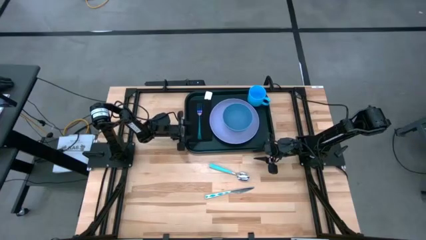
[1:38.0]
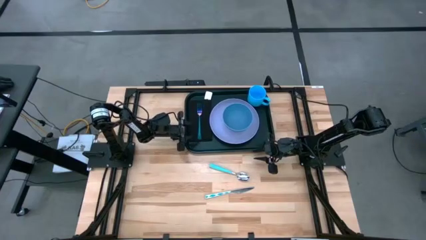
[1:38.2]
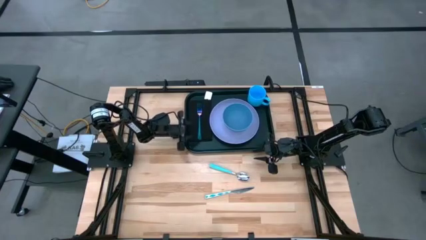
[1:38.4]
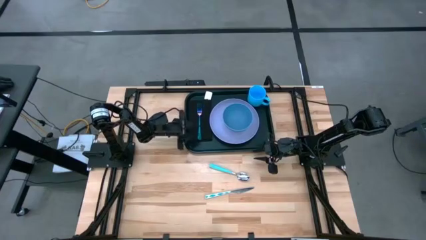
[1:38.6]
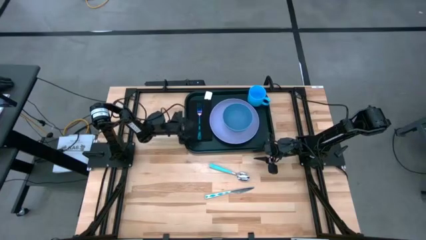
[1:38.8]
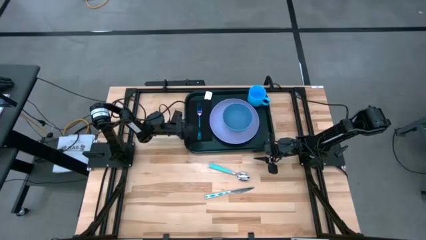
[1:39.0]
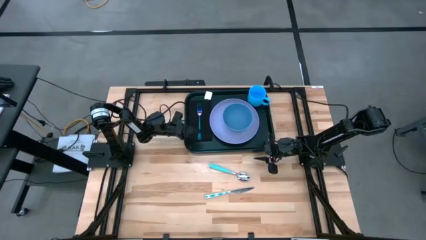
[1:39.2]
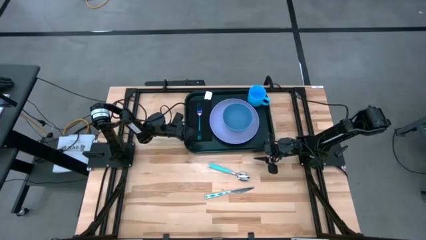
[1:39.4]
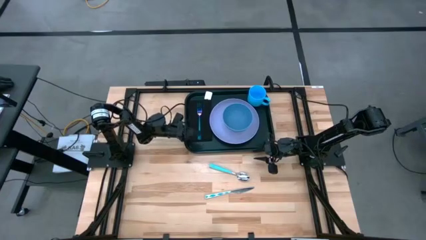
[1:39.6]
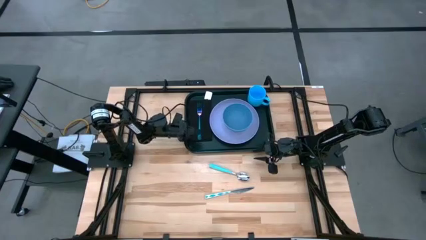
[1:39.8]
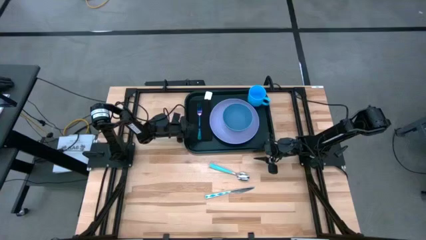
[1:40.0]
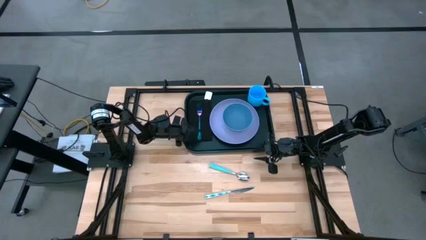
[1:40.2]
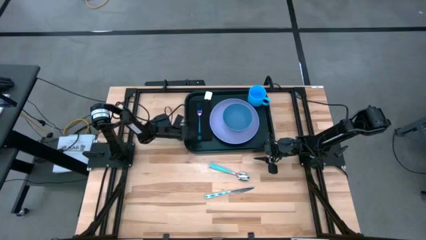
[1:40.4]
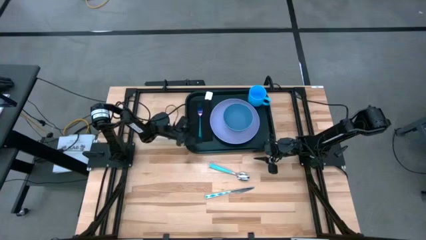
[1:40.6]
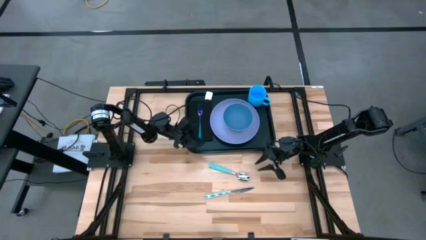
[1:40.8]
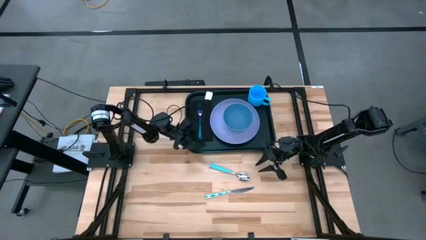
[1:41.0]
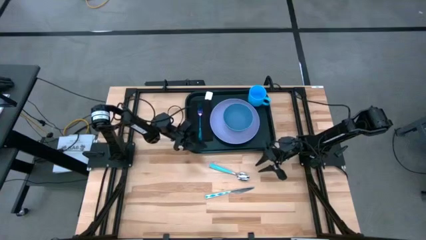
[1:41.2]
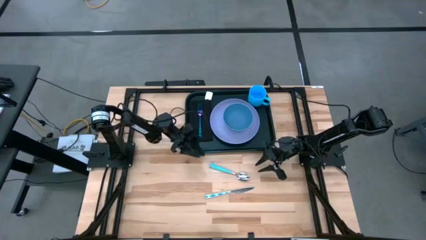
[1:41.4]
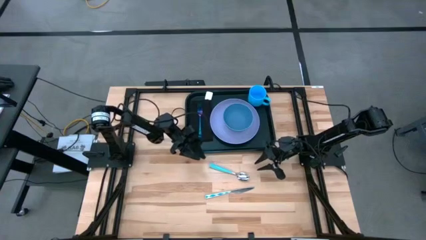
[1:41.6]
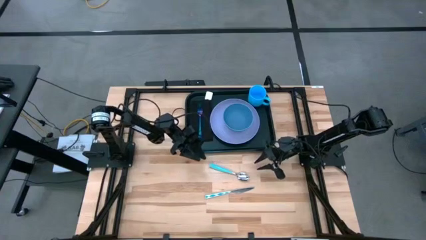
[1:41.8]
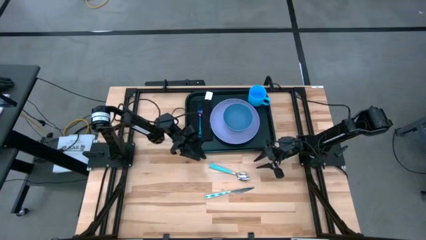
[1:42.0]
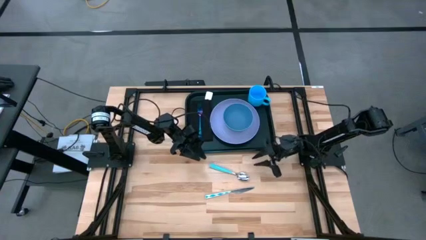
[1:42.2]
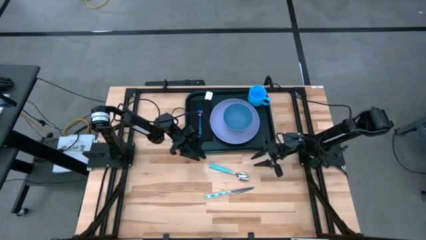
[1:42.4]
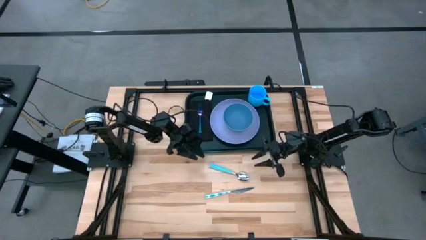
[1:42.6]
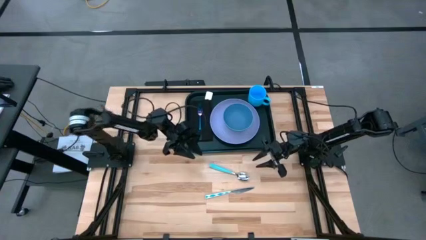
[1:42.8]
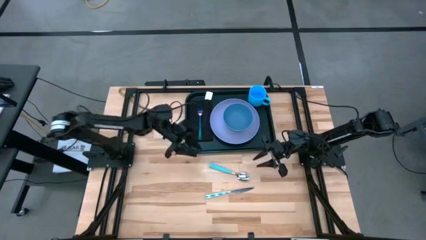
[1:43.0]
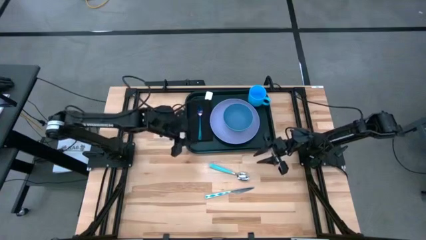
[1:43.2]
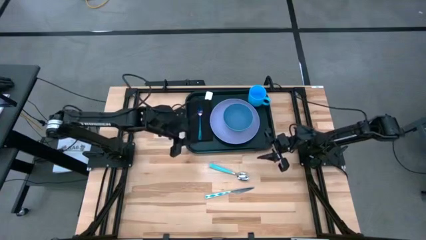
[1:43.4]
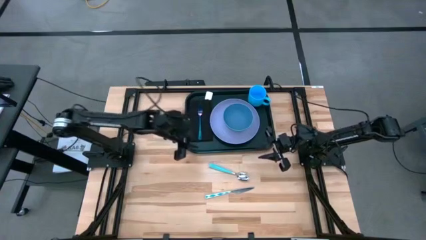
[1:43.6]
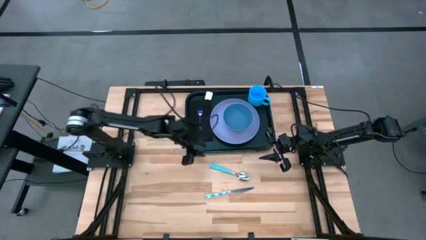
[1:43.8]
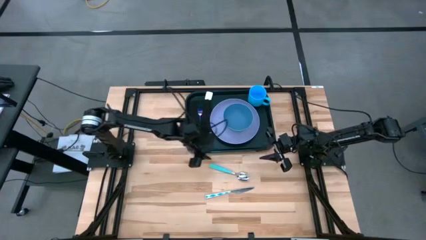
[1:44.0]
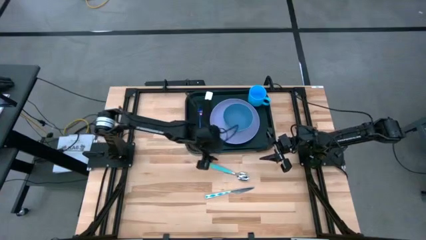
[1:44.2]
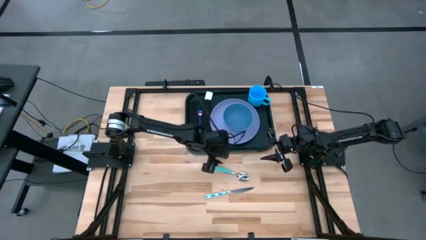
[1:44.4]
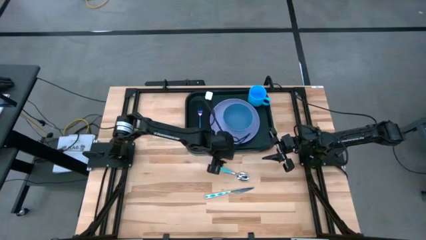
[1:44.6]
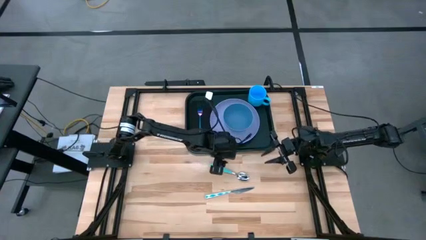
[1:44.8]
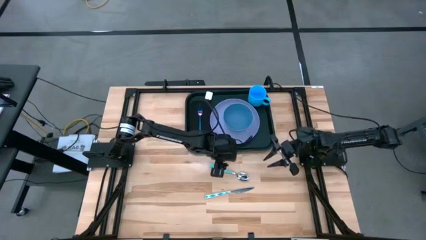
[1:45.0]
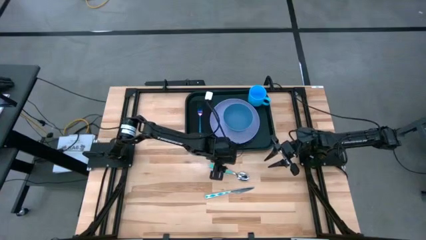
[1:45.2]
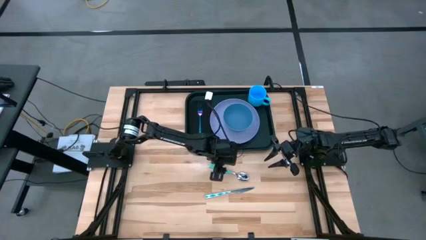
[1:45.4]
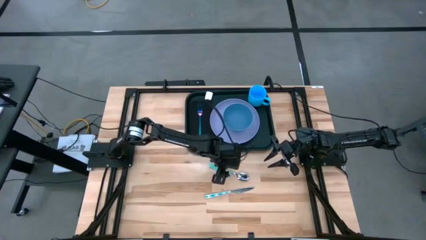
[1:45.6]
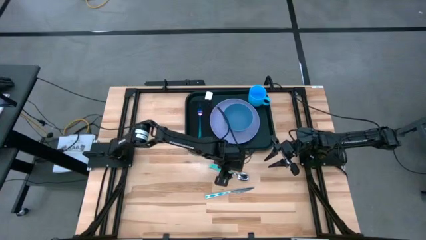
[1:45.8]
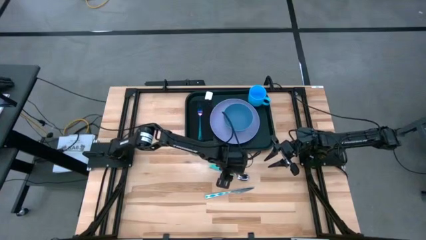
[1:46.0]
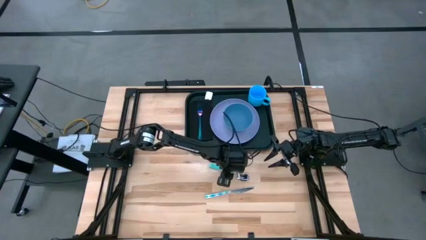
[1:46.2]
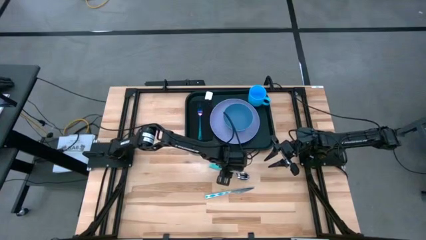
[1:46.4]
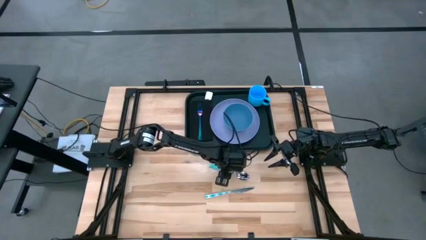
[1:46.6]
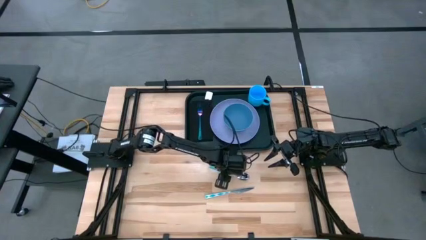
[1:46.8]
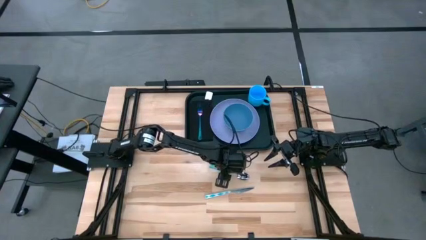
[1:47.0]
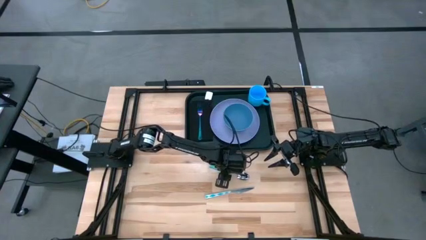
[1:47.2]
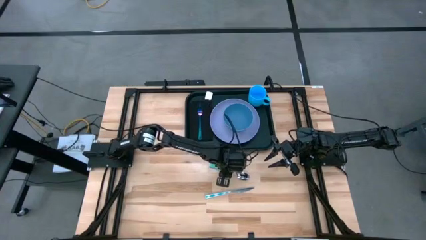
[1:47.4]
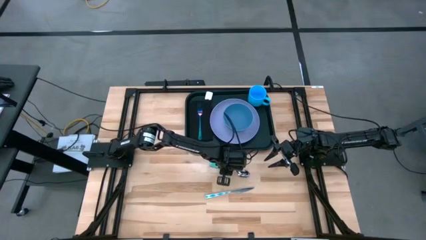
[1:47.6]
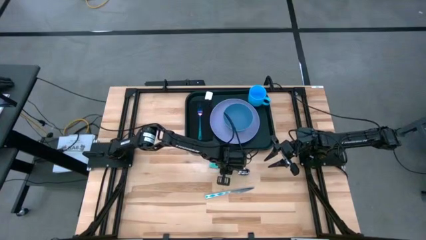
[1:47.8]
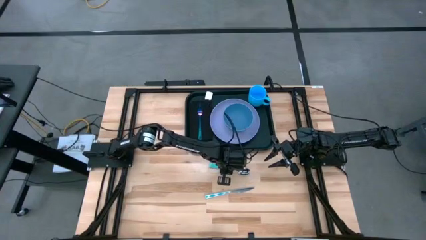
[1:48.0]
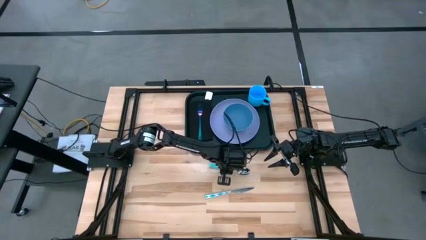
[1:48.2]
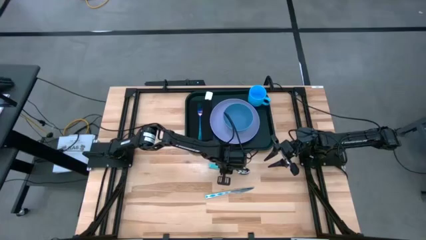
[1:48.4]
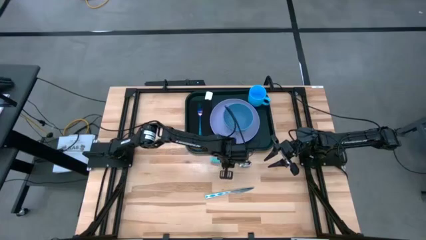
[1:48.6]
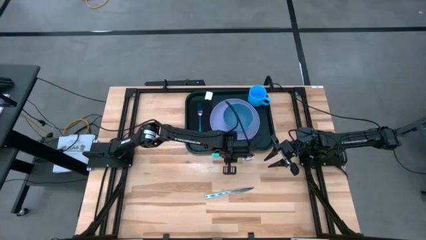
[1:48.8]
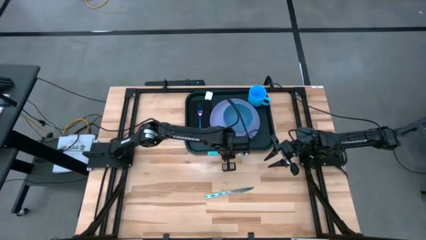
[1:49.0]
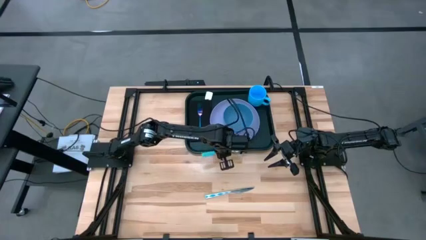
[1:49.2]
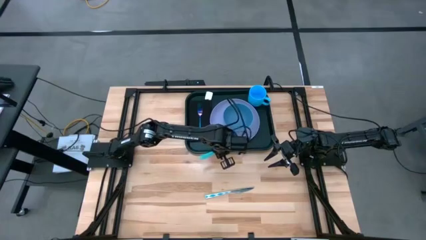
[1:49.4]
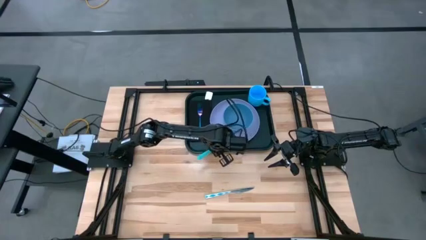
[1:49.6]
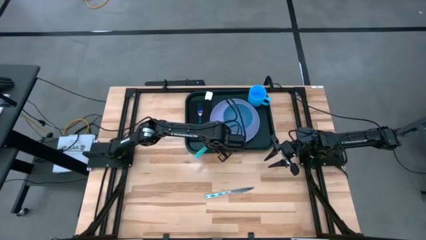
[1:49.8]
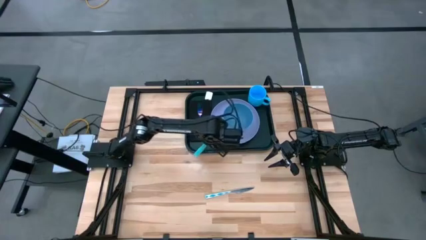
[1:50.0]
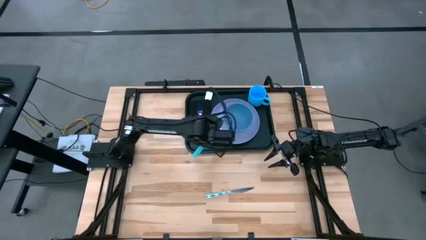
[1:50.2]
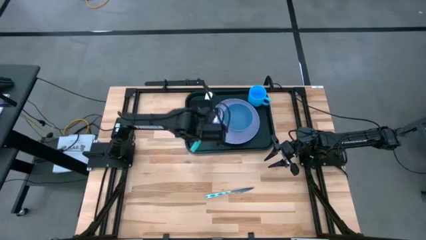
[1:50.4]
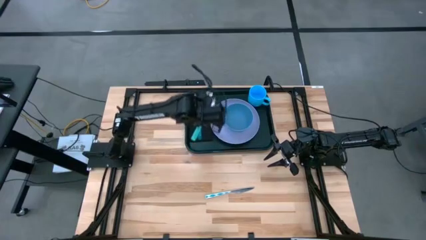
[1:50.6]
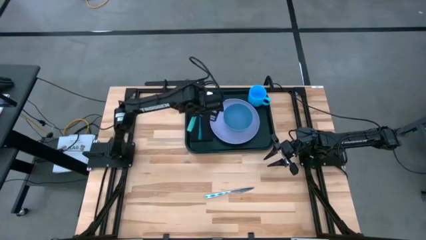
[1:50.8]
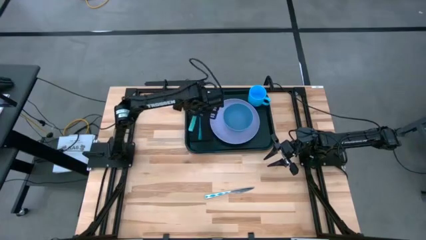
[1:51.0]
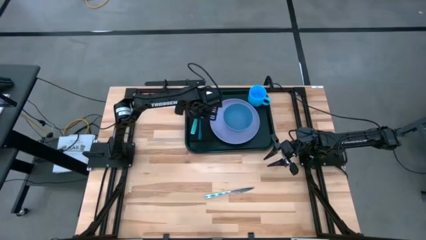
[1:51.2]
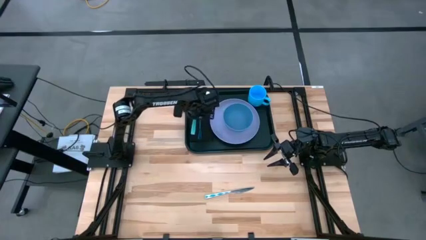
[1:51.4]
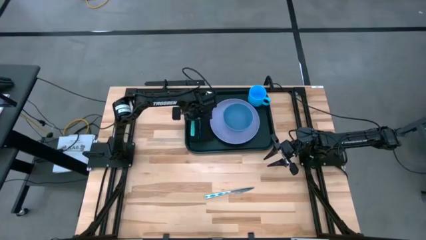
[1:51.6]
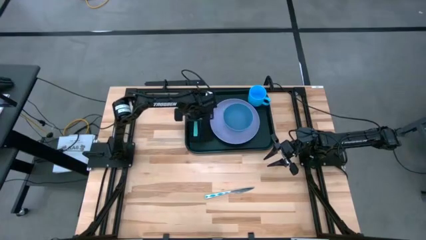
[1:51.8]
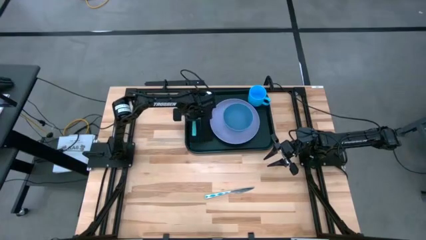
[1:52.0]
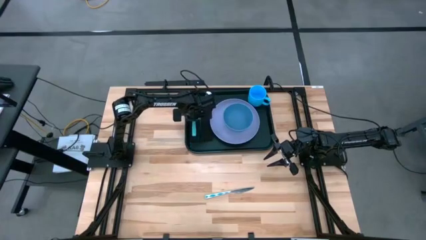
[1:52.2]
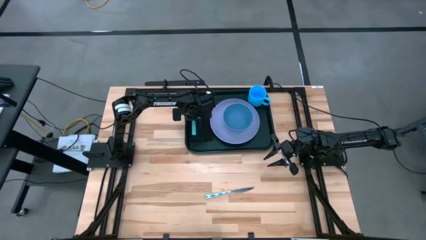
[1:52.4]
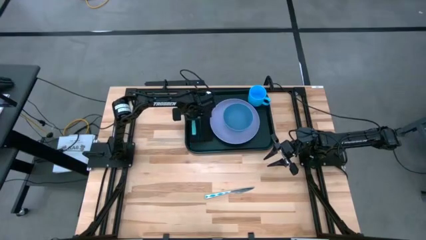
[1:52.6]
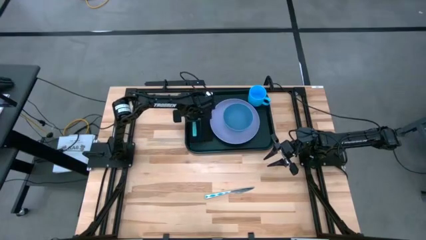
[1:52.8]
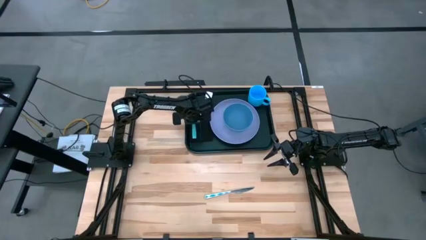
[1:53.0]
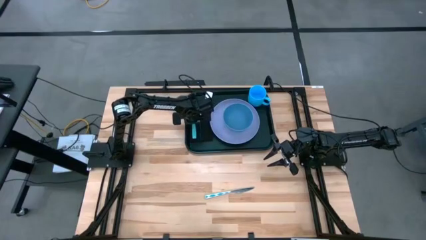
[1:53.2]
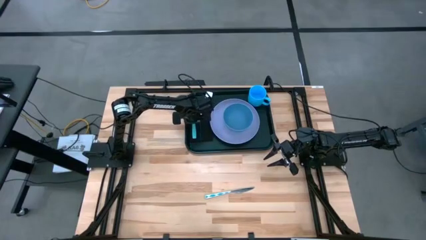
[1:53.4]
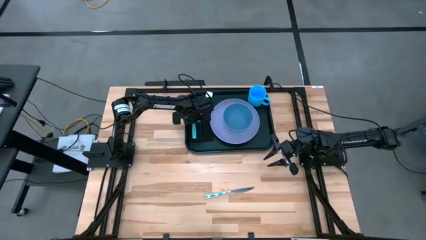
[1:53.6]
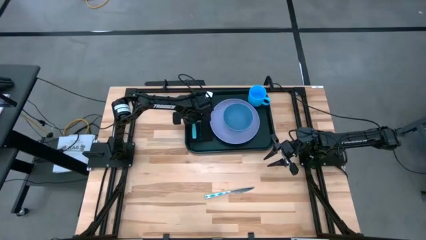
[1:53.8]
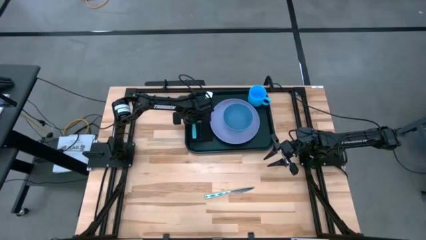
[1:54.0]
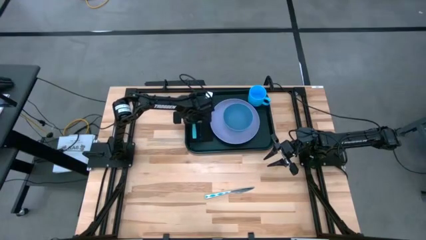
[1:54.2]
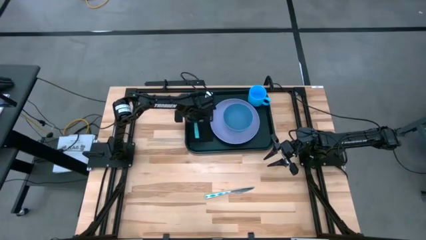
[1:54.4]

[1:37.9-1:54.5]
Task: Set up tray
Put the blue spoon to the left of the blue fork on the black napkin on the black tray
